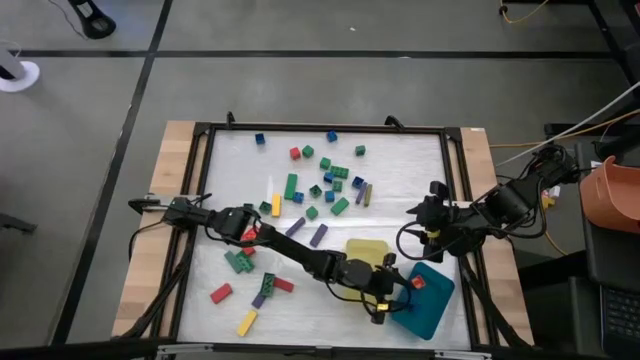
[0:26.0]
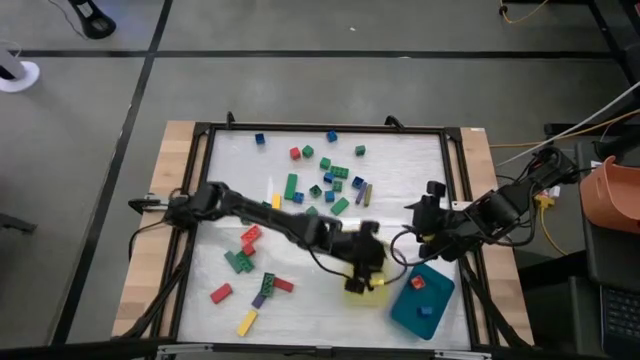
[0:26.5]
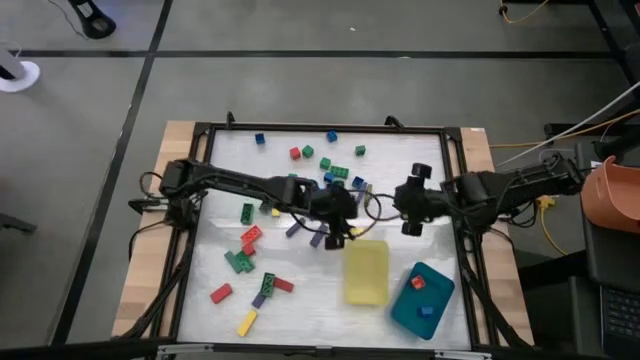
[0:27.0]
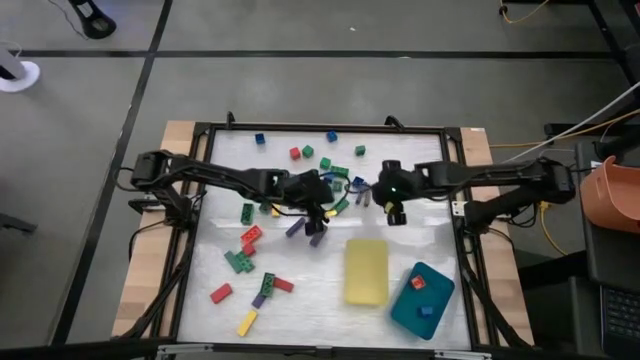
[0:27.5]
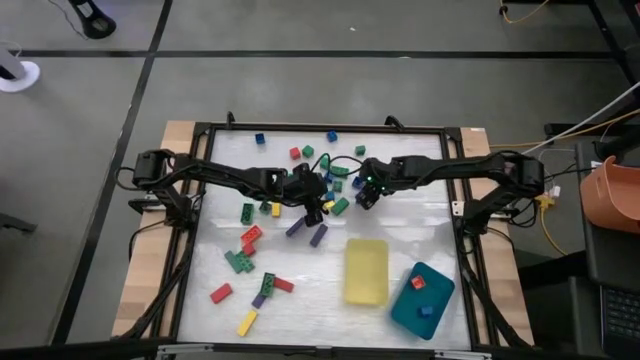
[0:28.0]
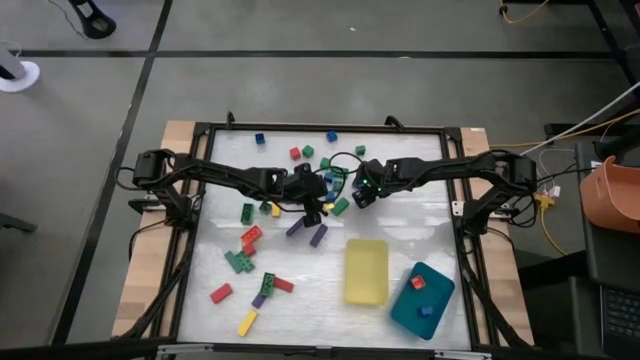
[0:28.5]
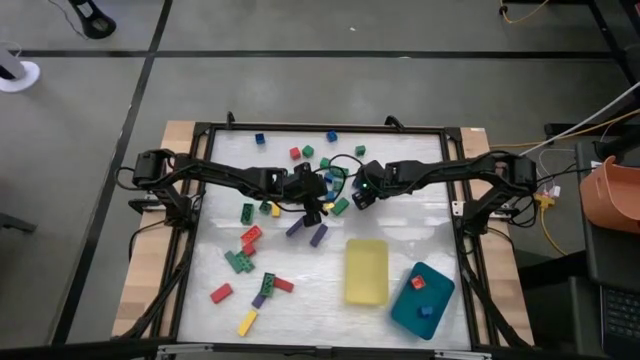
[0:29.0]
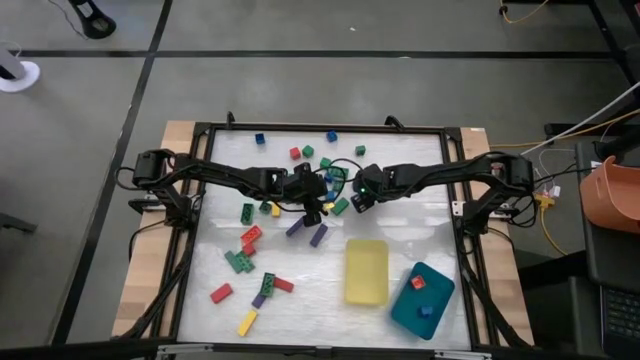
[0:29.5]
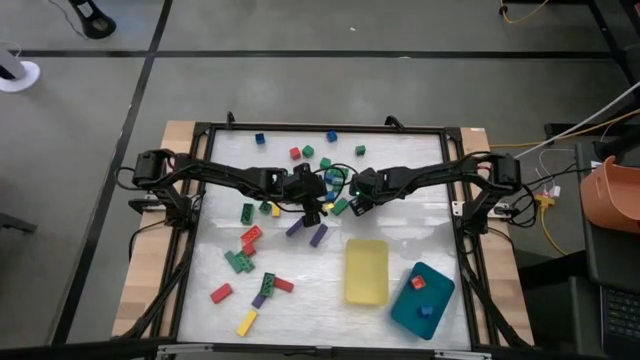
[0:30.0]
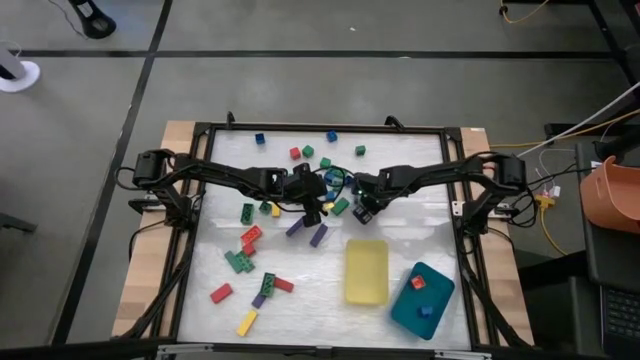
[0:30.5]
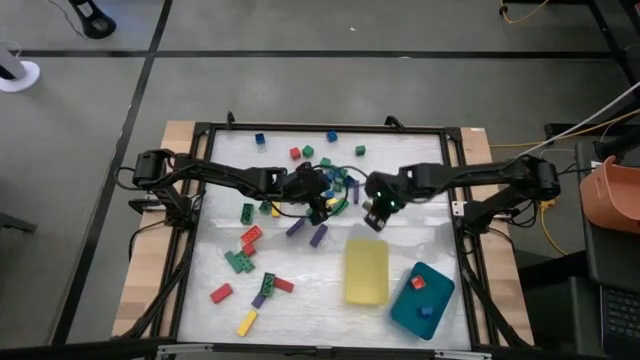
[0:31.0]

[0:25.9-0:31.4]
Task: Sort blocks by size
Put the long yellow block into the yellow bin

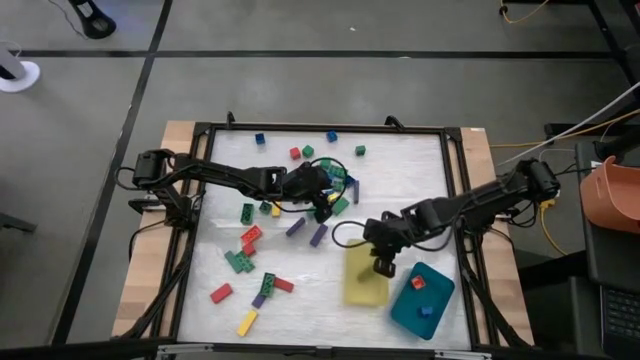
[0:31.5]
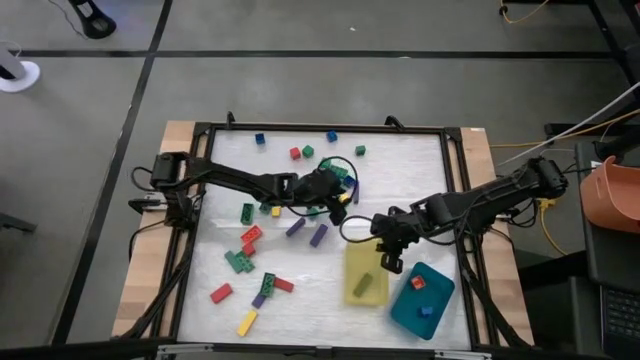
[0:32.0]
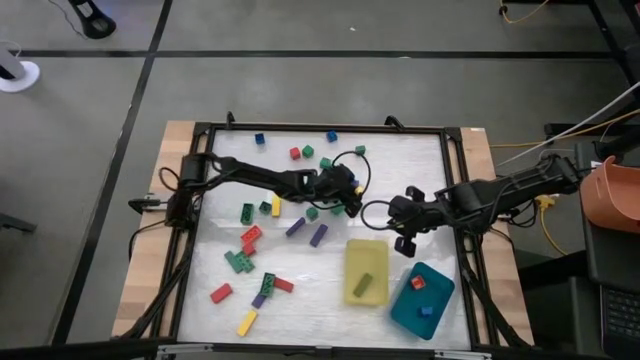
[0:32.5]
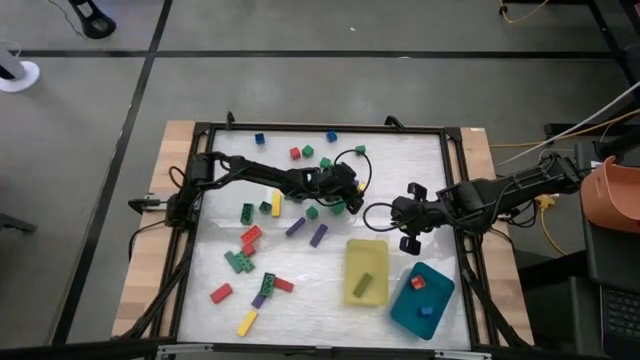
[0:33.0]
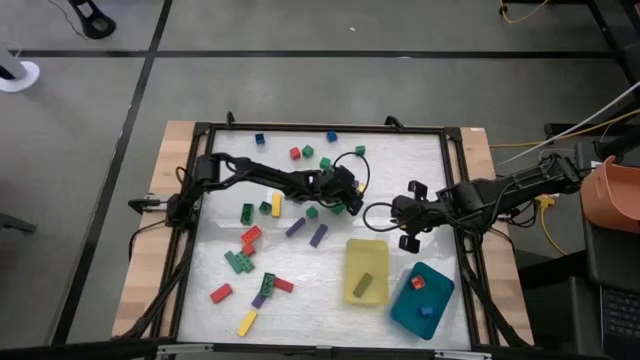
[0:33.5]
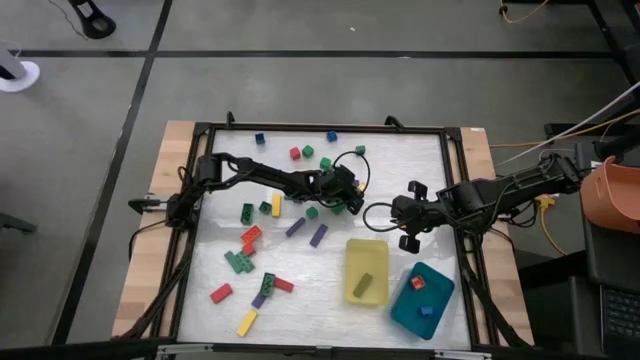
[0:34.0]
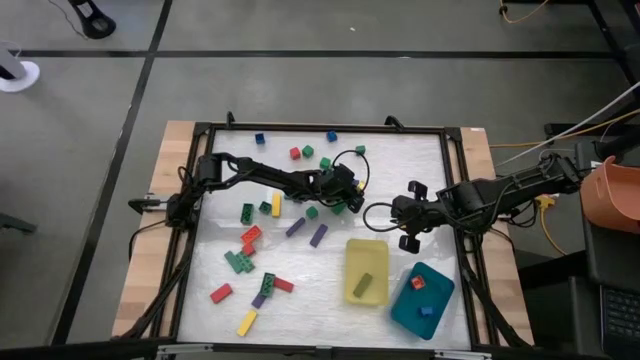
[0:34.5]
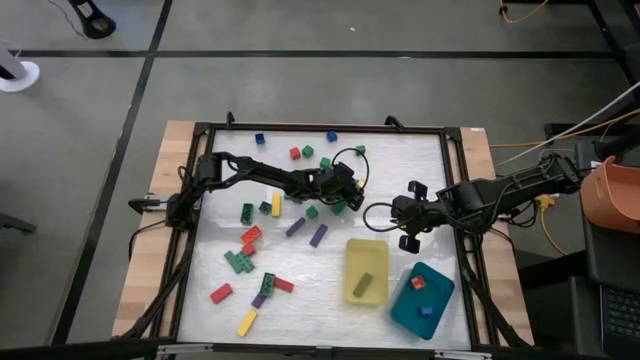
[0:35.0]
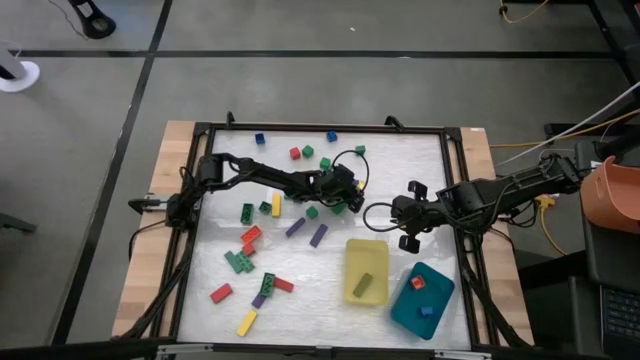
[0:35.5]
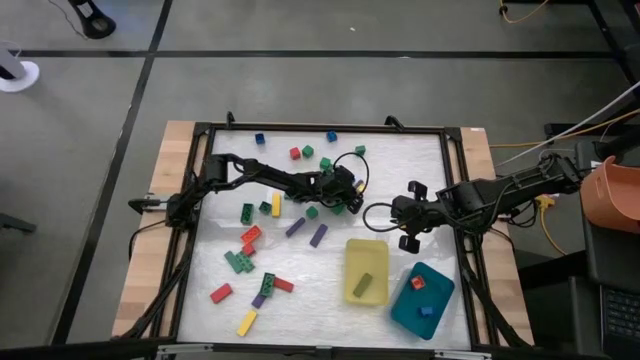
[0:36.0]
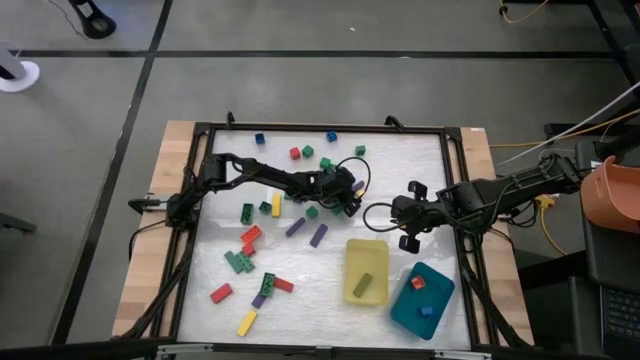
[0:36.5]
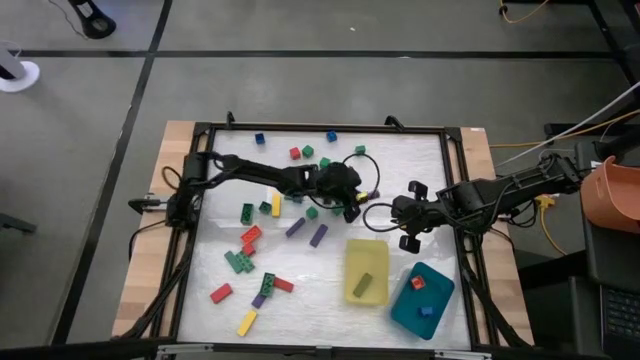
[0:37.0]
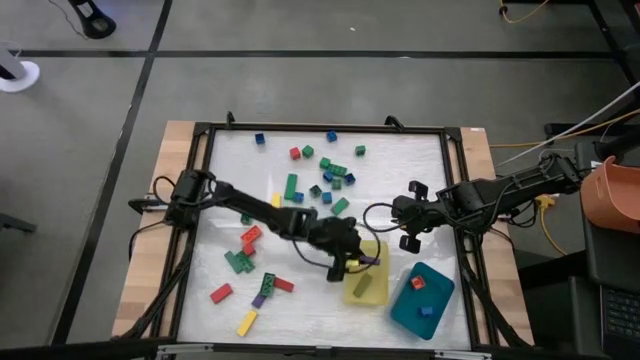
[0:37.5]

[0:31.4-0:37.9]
Put the long violet block into the yellow bin

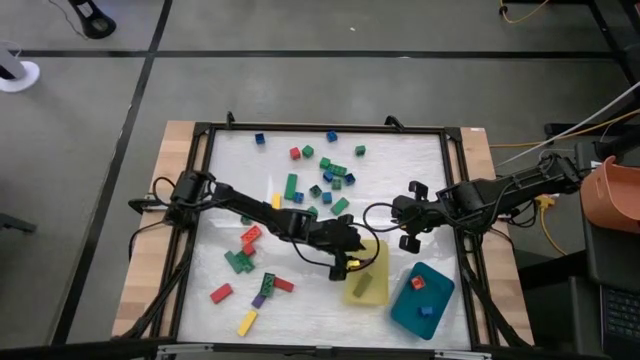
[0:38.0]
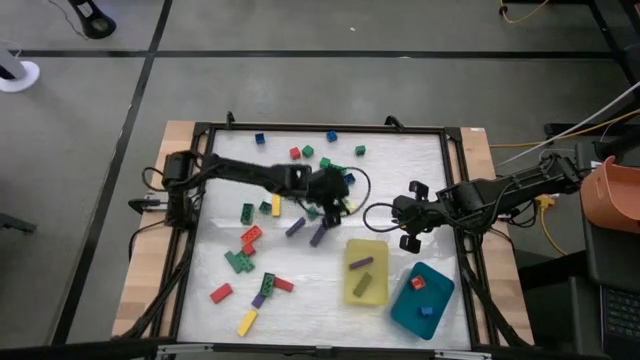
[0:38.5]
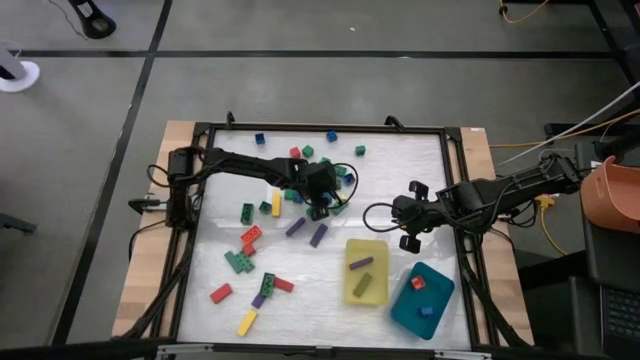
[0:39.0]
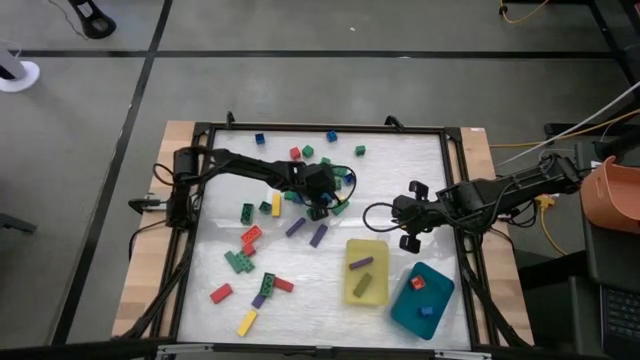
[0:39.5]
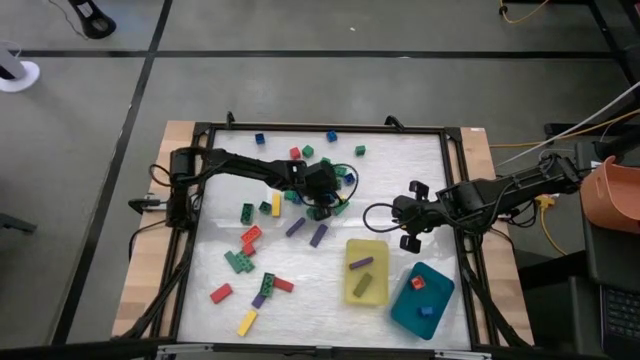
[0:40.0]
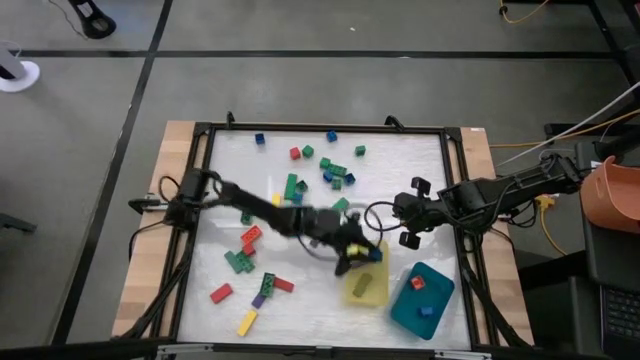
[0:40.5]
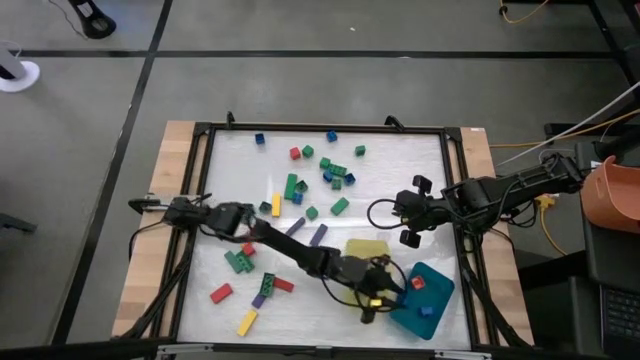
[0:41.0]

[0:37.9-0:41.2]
Put the small blue block into the blue bin

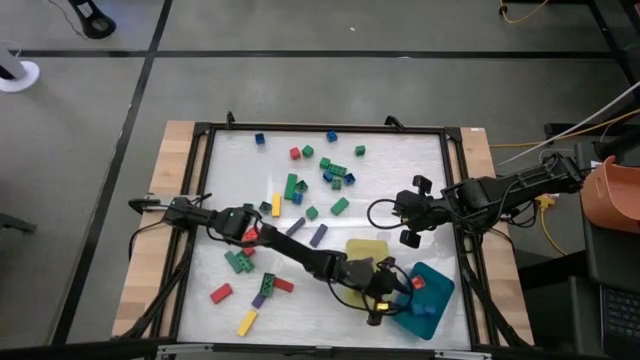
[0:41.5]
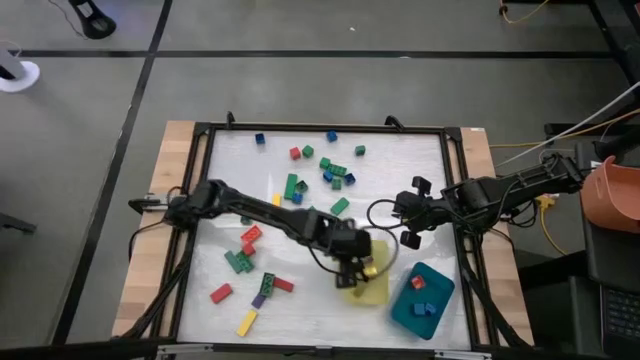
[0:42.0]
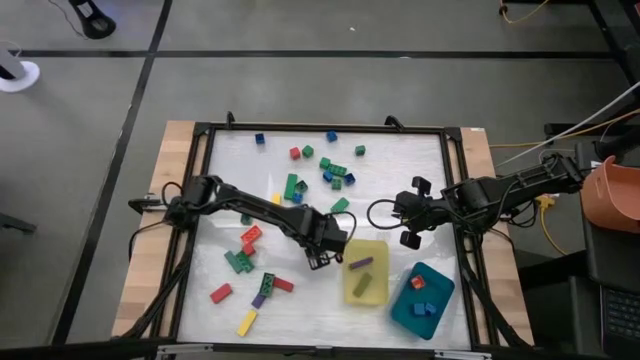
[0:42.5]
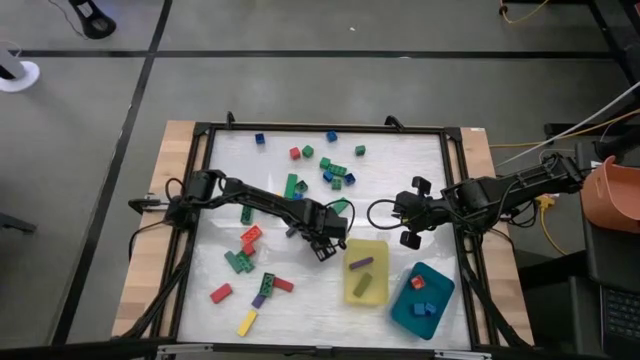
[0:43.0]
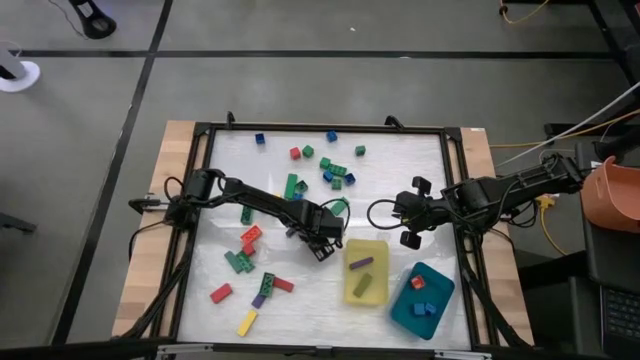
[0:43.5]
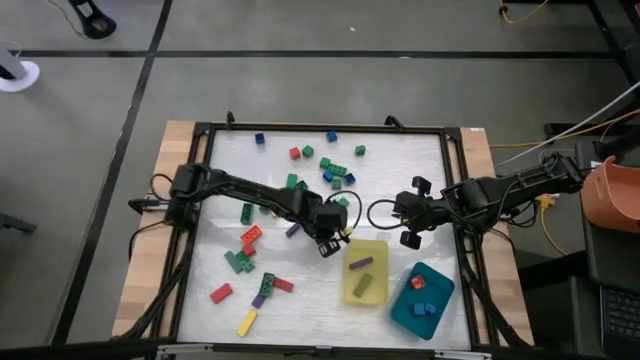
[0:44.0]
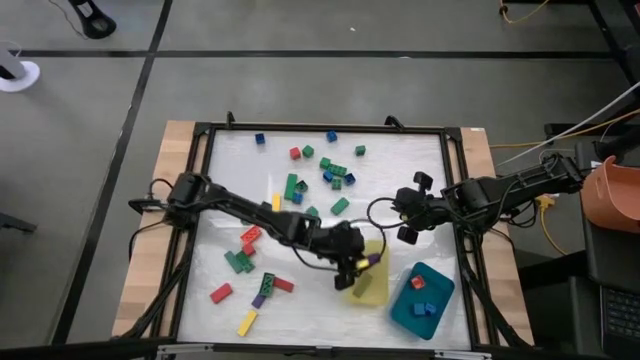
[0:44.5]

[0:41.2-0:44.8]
Put the long violet block into the yellow bin

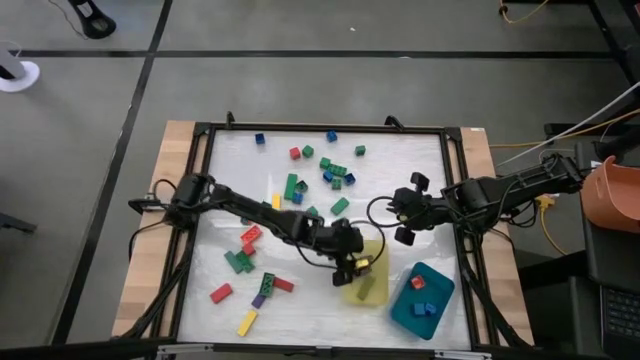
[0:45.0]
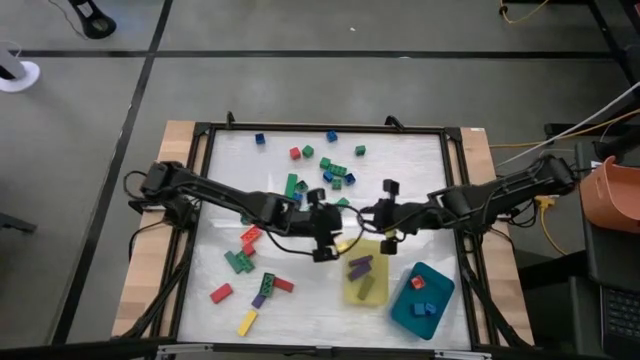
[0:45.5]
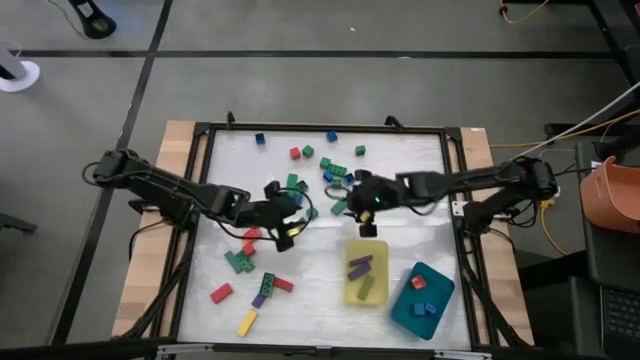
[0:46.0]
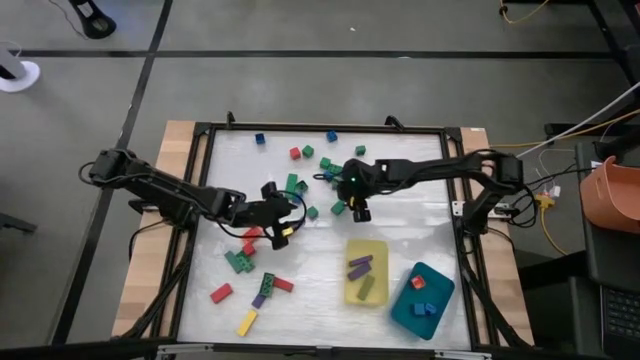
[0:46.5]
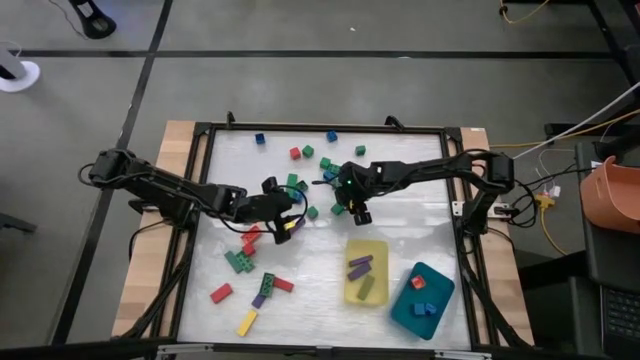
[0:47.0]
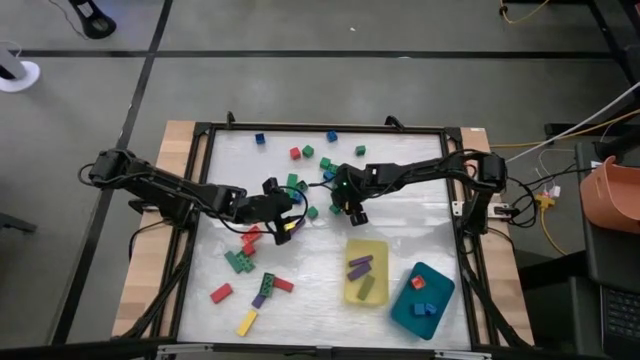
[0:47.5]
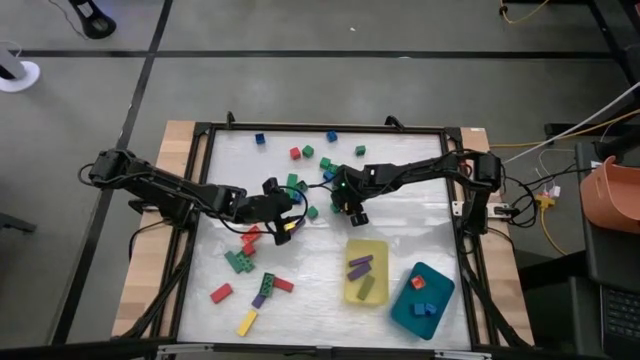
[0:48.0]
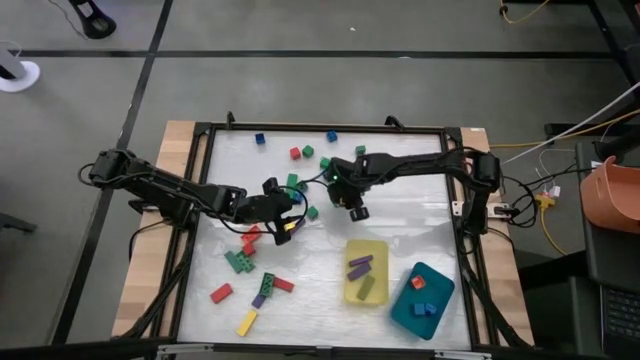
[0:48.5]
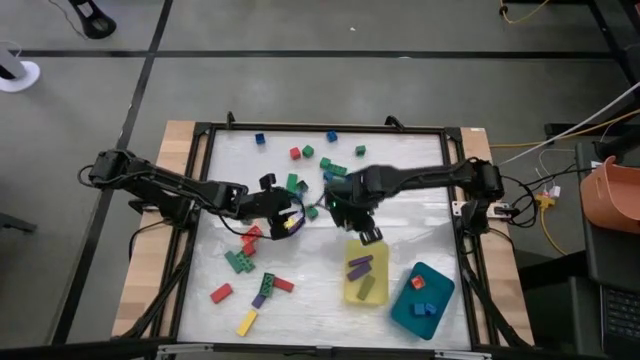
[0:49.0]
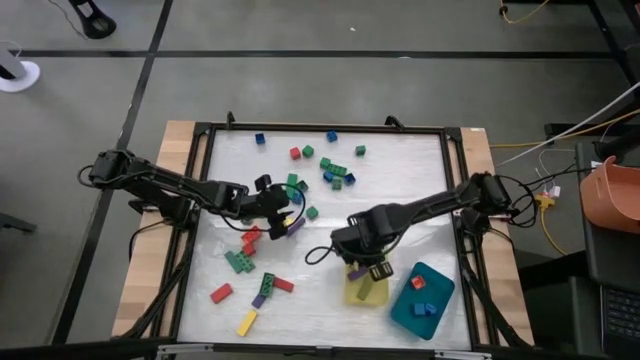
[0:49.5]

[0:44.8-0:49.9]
Put the long green block into the yellow bin
